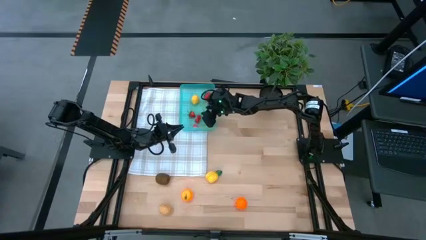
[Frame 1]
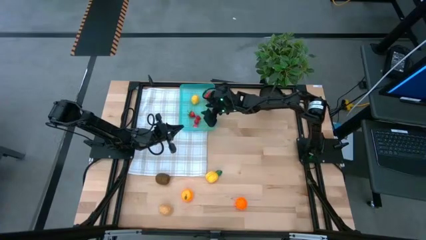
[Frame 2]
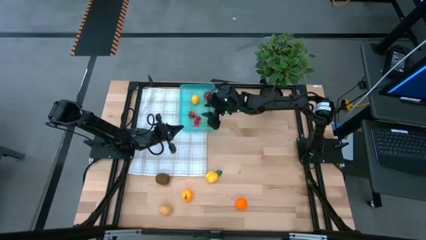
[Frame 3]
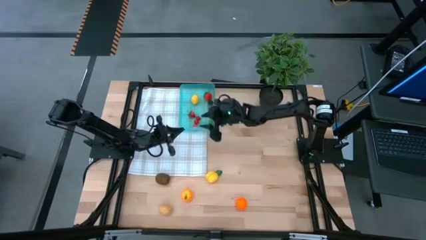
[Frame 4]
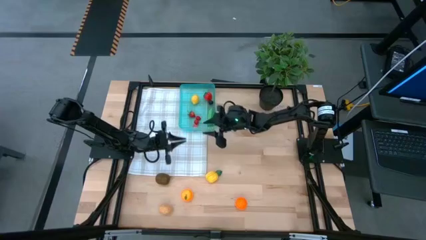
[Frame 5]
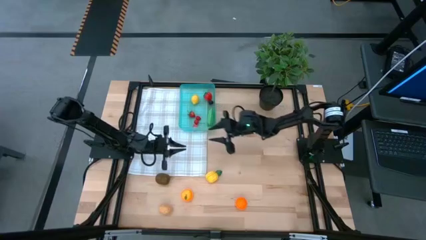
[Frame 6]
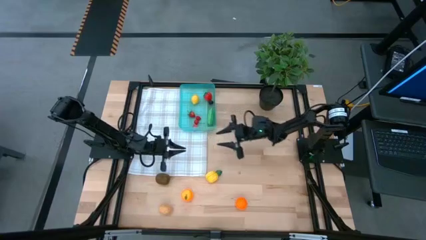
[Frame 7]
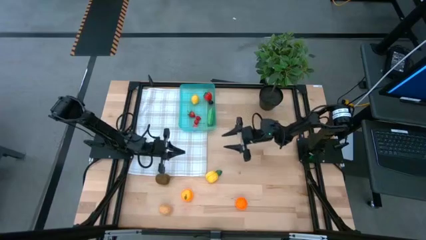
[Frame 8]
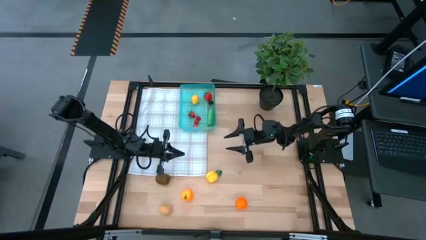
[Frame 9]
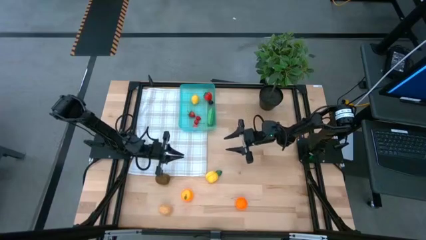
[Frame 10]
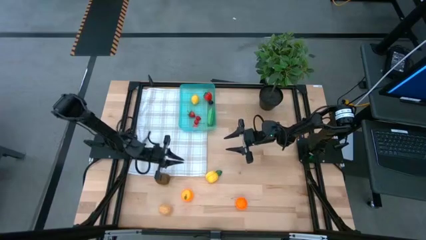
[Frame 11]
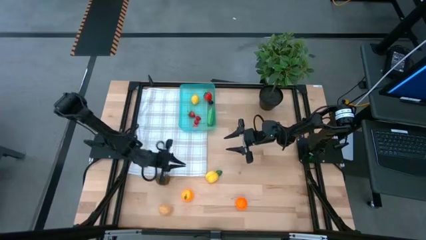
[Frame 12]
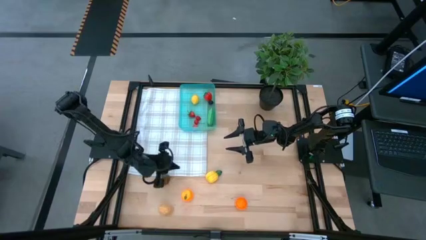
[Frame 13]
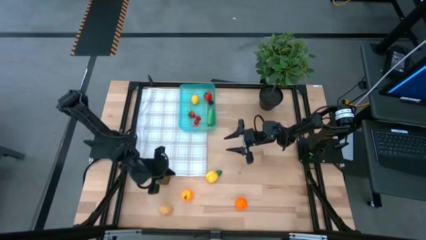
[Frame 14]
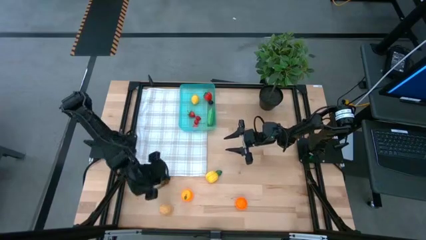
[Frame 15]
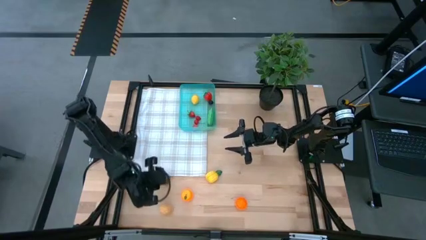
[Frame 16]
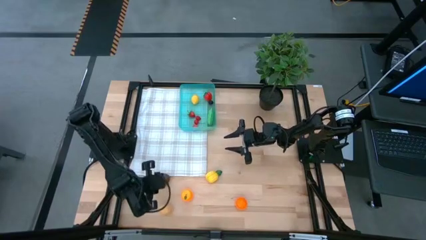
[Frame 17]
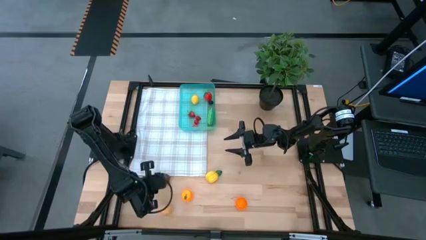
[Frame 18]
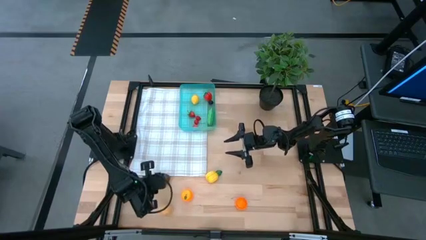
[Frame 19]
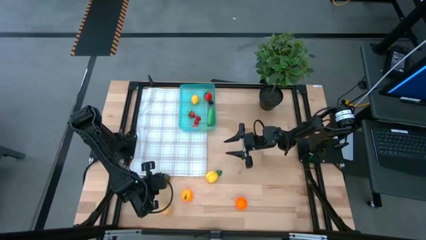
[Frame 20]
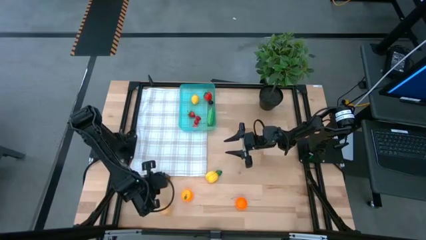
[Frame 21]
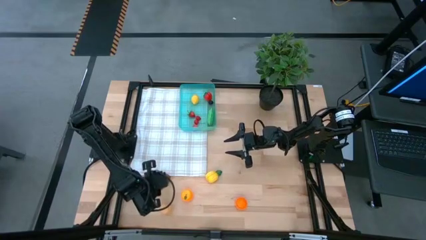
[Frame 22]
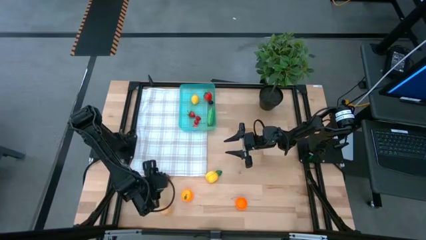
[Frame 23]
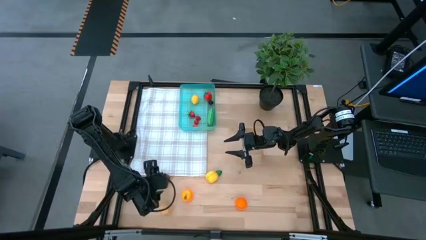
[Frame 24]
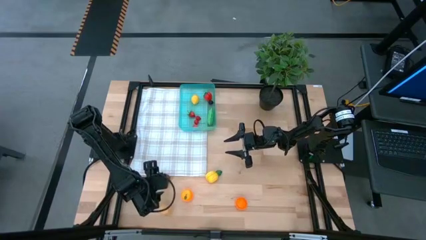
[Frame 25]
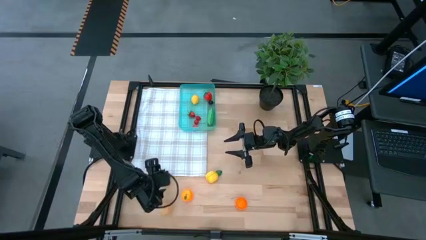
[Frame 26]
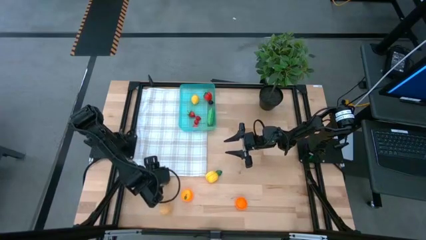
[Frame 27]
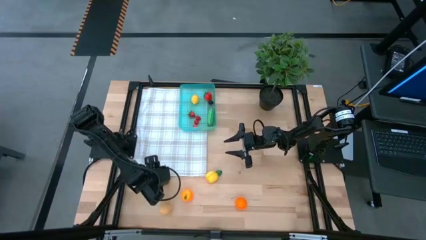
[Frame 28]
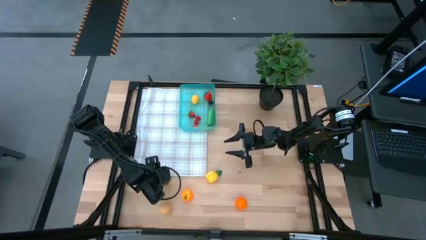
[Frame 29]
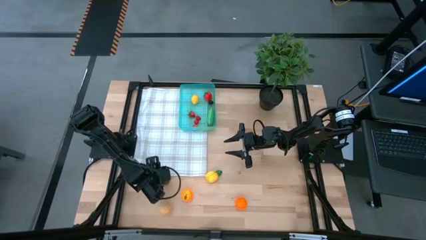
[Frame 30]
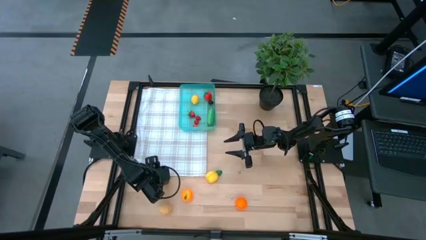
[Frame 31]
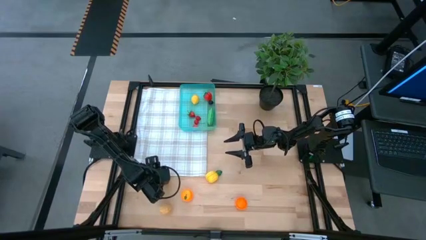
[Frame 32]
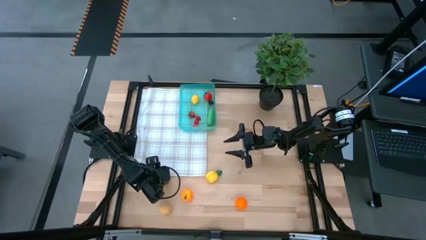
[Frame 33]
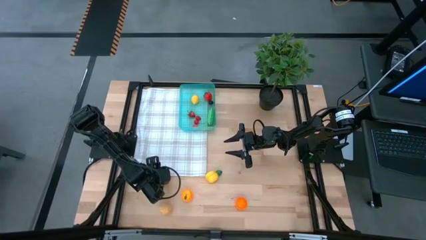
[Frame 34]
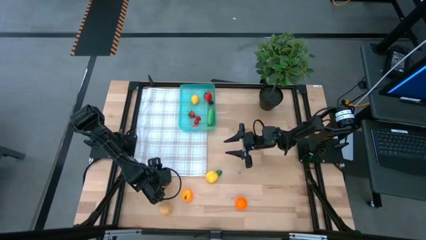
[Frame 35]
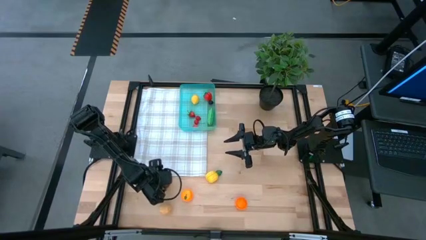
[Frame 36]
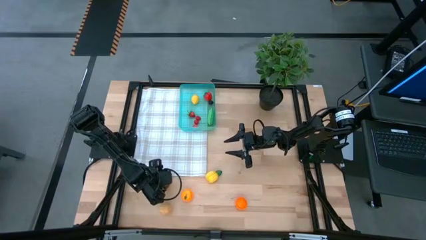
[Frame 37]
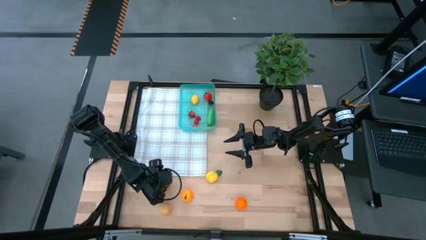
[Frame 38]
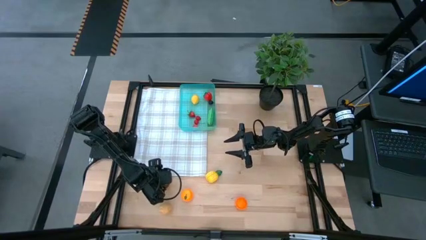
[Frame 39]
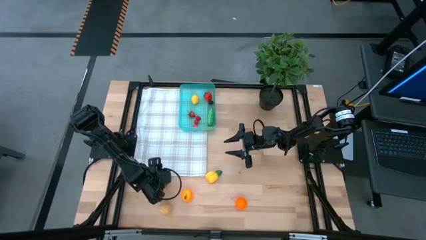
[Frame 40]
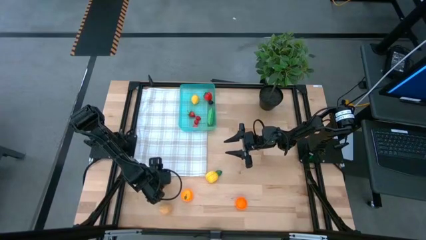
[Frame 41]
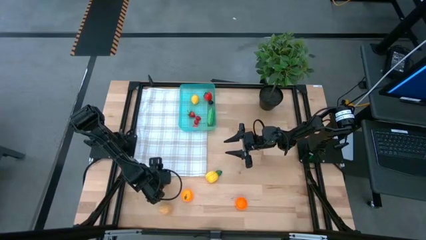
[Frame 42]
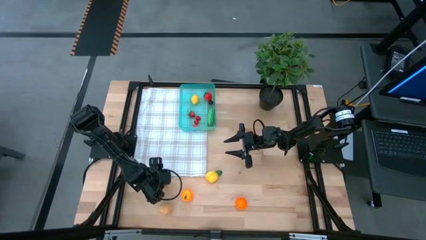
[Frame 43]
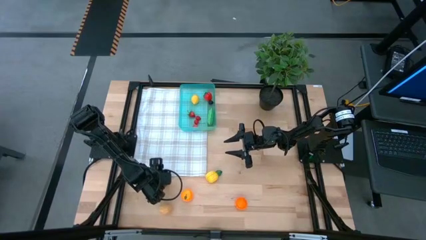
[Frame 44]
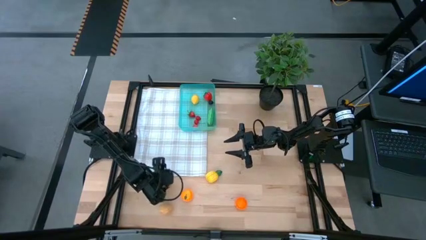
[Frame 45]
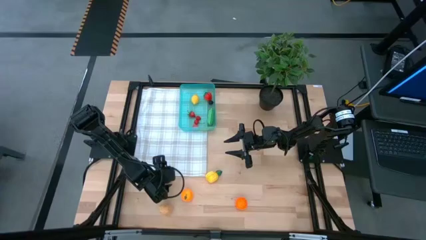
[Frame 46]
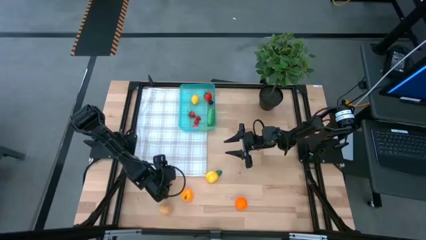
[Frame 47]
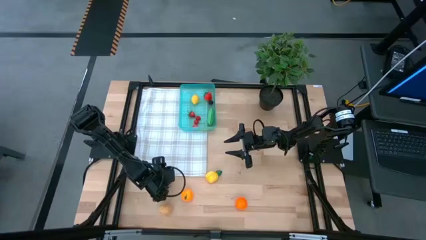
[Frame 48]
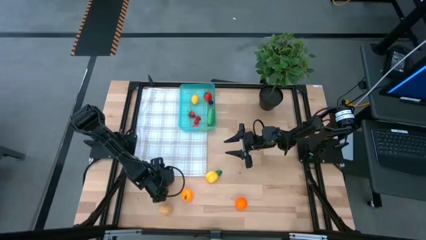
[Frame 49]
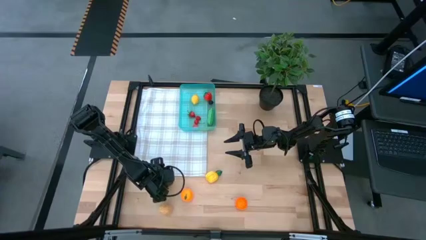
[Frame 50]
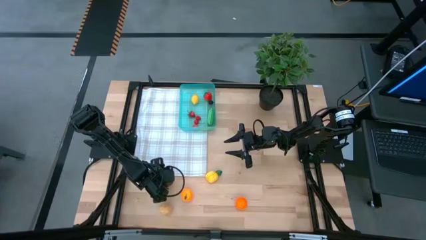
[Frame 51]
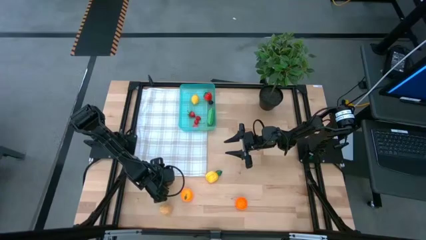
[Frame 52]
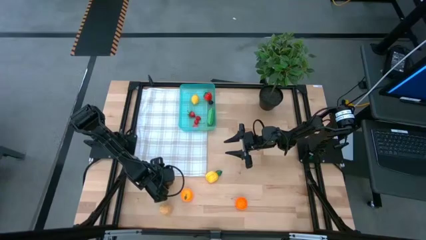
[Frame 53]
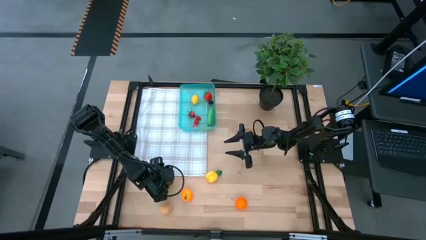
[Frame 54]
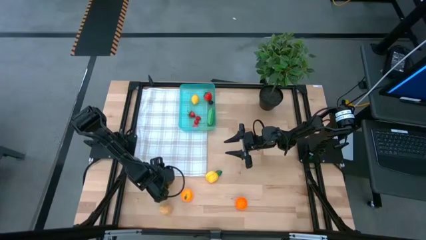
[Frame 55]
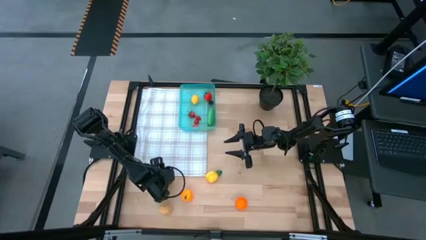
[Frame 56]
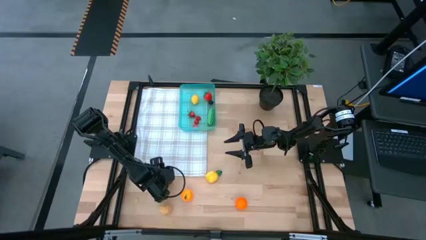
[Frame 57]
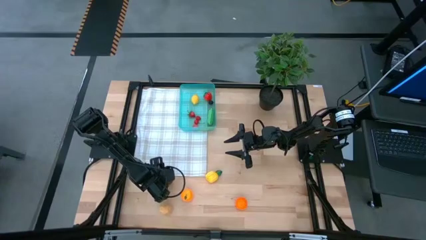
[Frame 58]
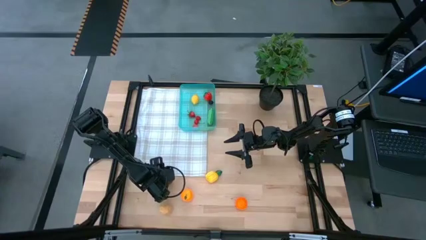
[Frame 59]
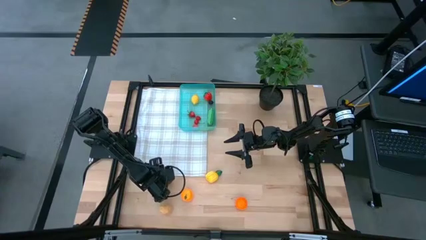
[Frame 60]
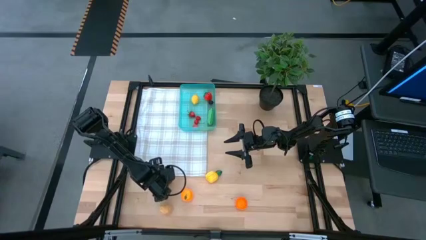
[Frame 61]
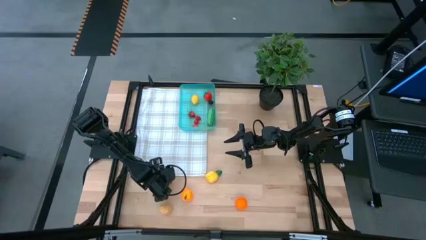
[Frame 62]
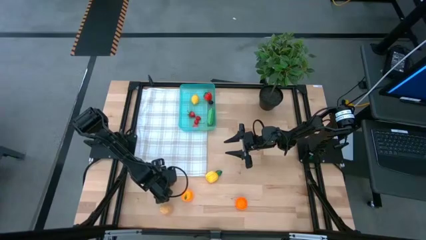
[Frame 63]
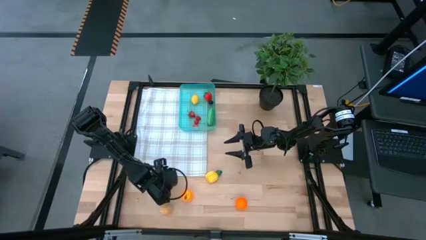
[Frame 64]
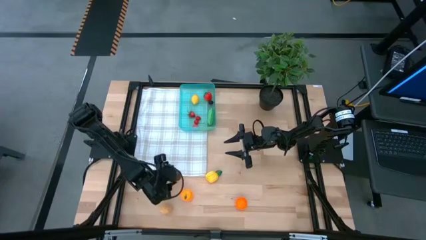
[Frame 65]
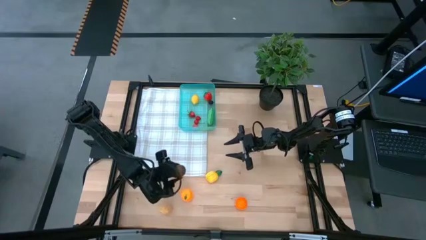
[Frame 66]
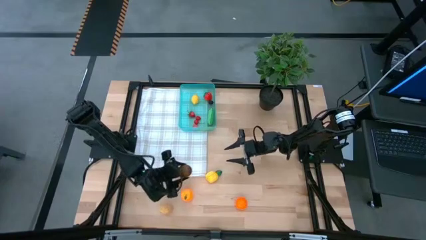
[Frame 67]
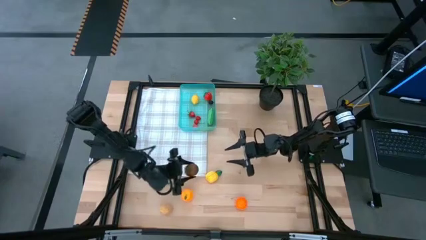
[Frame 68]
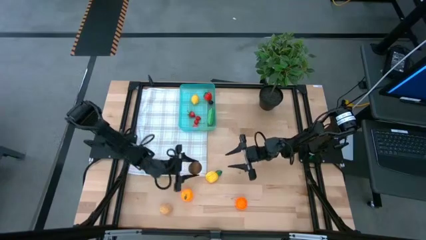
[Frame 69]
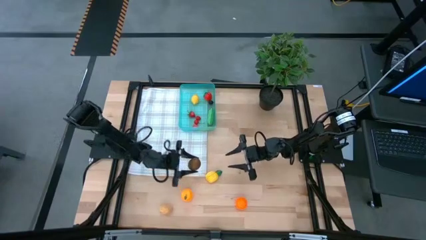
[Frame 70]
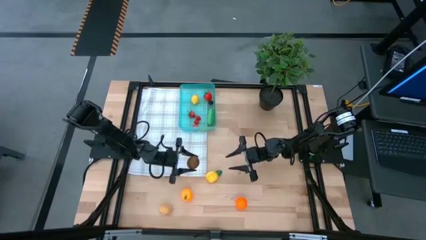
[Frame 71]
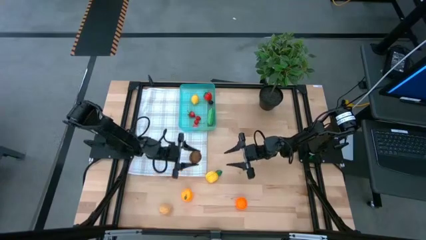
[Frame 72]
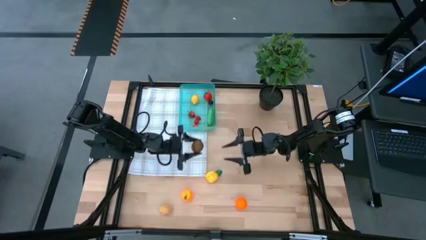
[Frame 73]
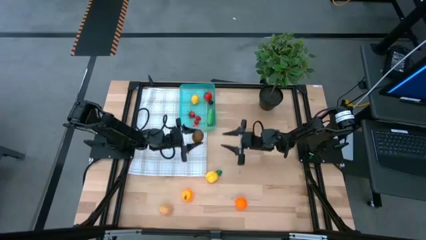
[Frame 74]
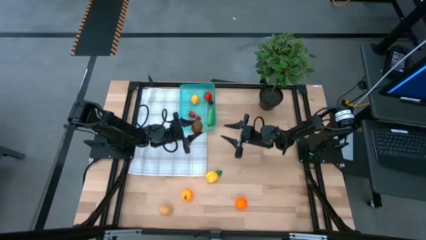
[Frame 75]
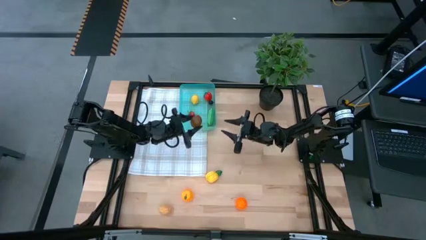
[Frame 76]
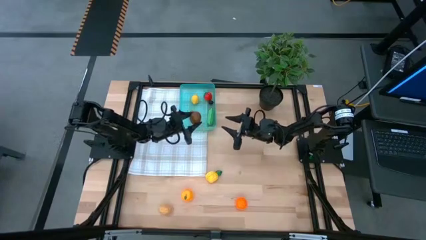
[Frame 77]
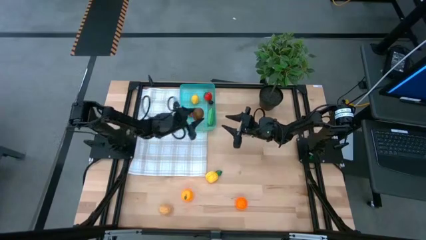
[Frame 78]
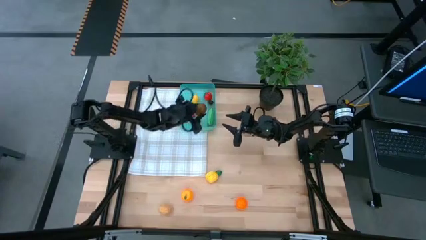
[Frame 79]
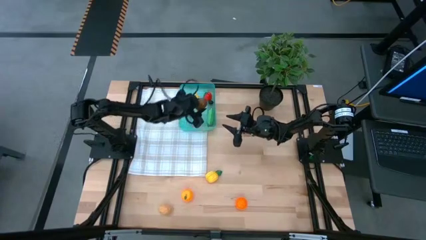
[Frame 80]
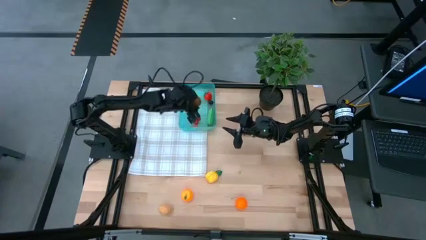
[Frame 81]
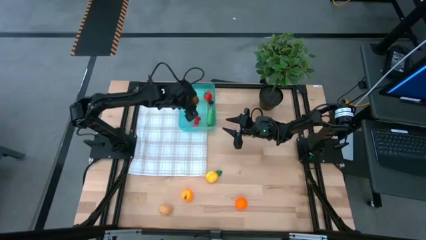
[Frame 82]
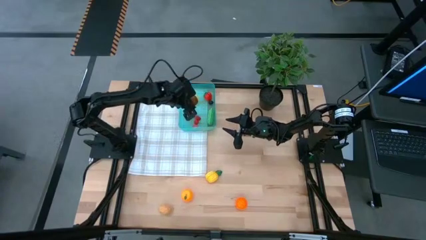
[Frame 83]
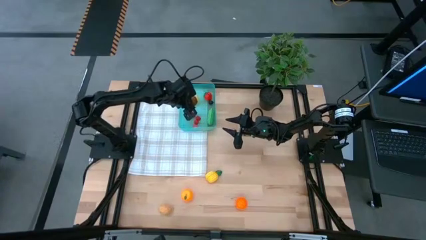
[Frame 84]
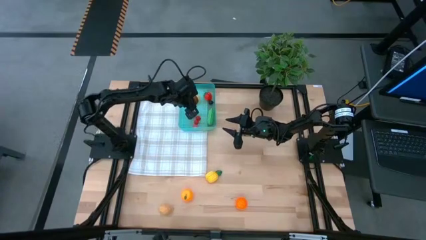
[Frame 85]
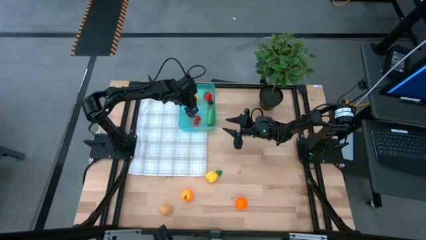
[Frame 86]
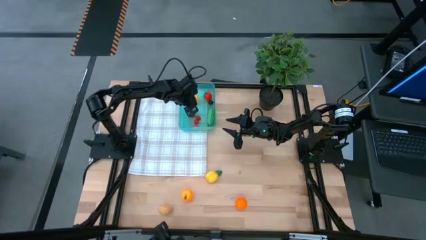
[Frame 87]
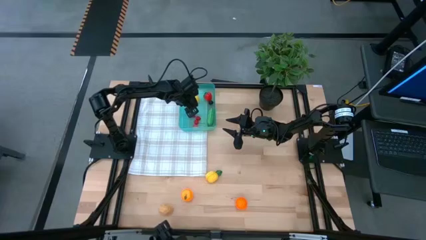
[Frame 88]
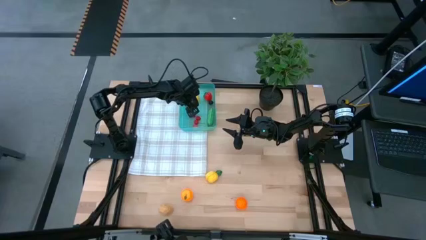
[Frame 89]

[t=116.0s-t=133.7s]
Task: Pick and placing Produce into tupperware
Put the brown kiwi into the blue bin
